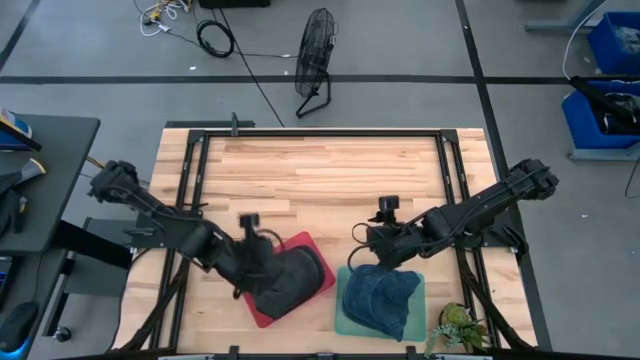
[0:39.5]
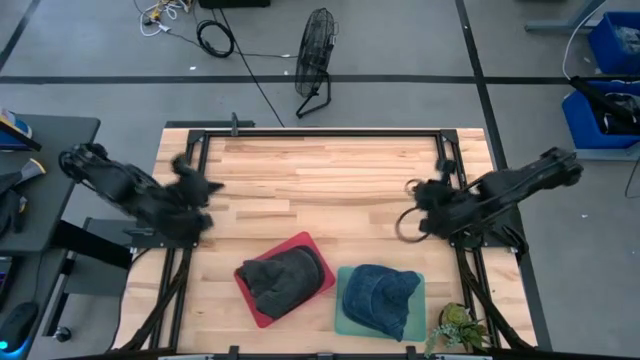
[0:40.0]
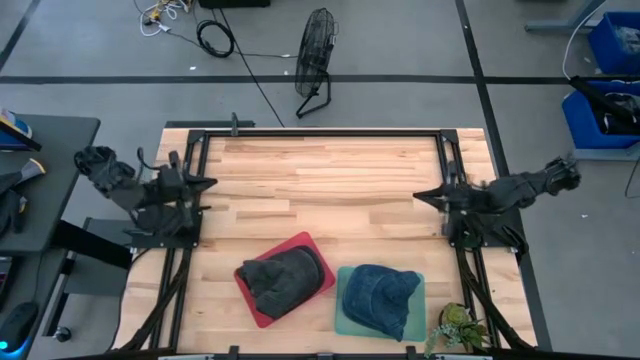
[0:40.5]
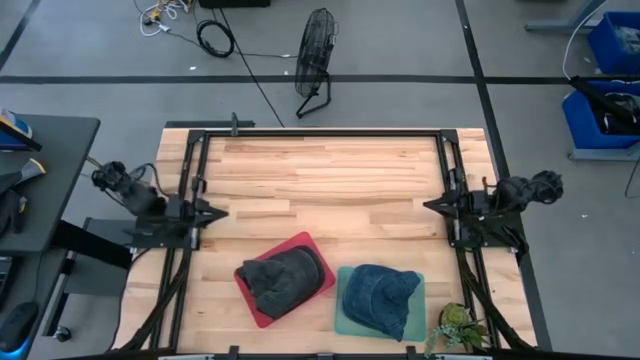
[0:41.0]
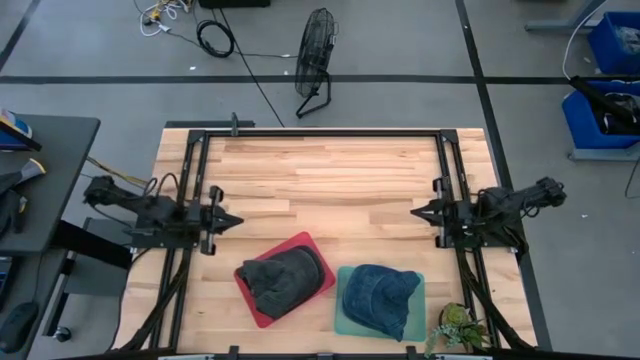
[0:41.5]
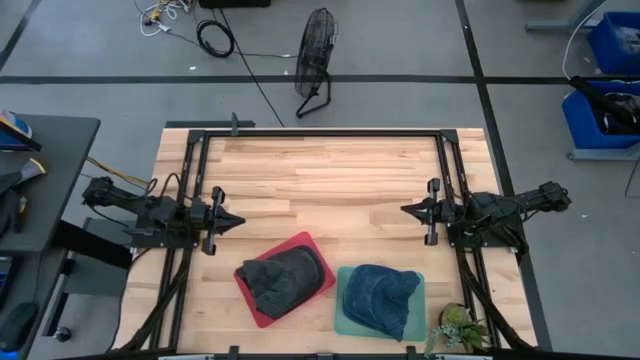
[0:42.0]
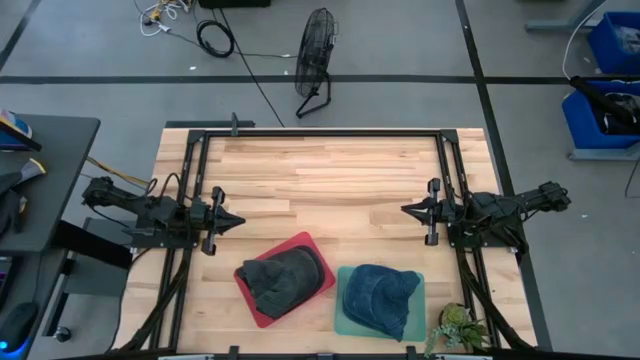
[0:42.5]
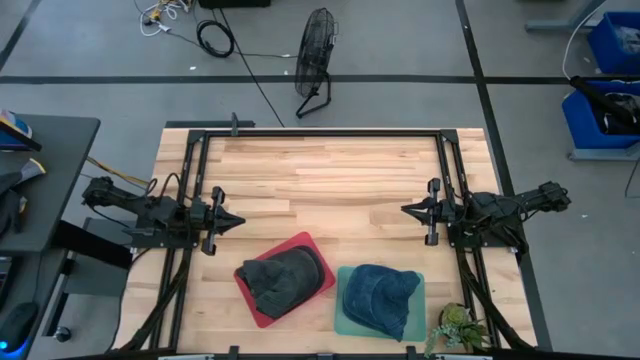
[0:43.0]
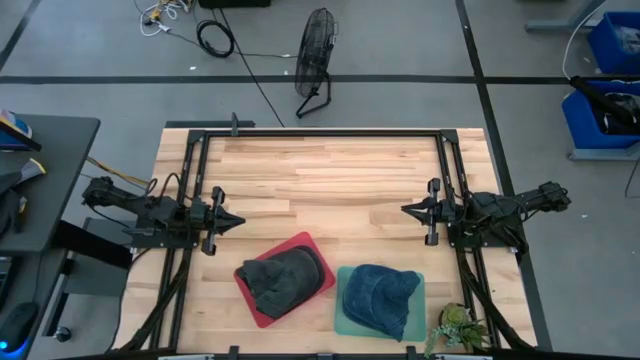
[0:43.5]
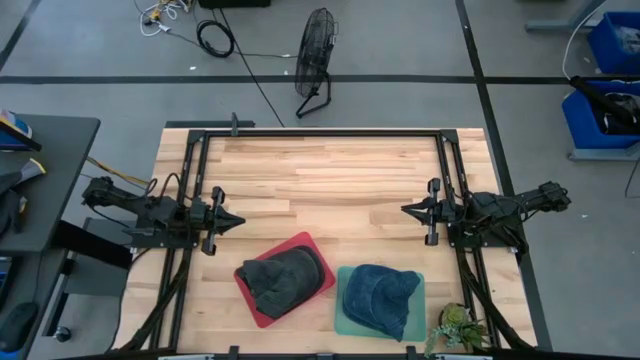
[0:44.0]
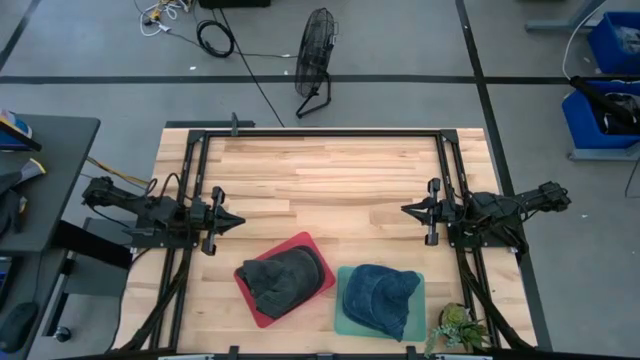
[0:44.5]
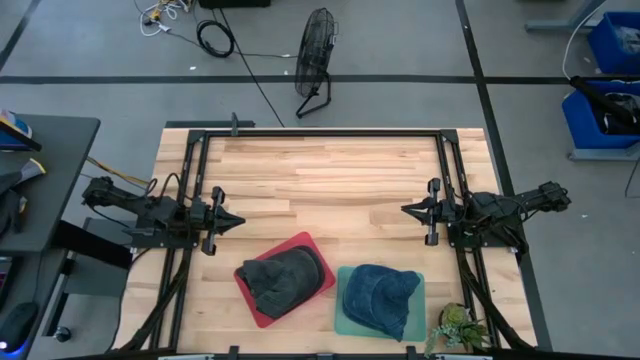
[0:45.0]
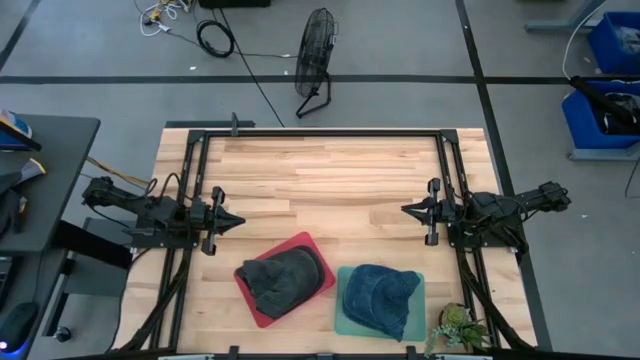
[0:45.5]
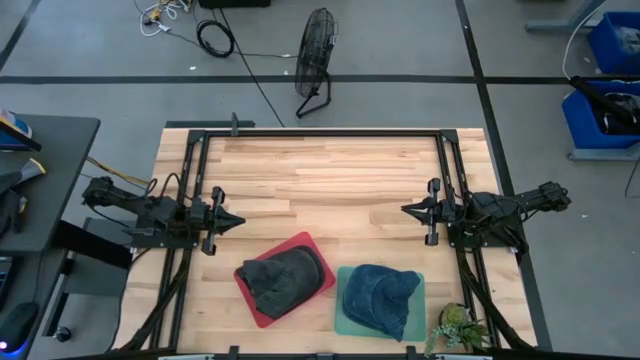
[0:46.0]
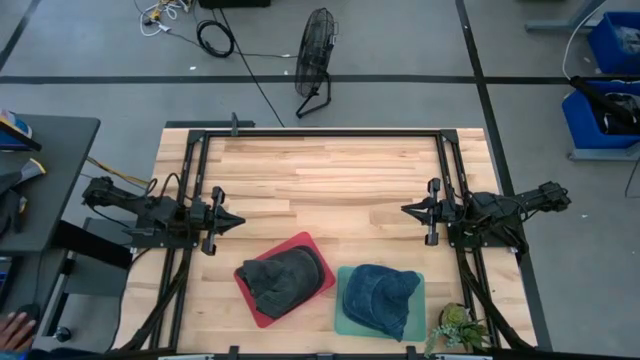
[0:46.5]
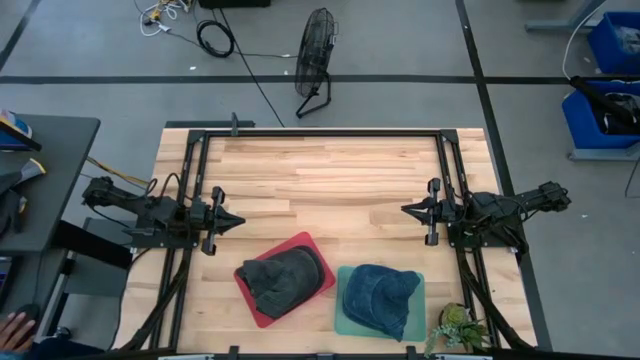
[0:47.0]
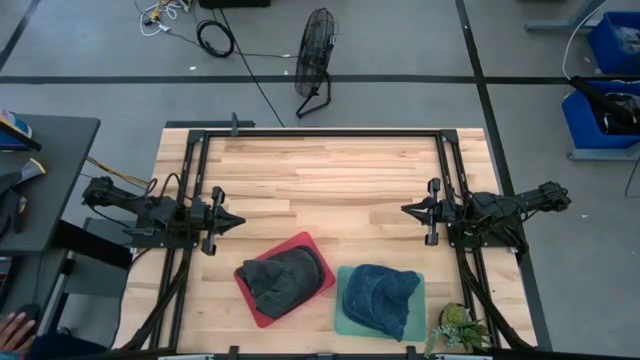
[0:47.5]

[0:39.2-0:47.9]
Task: Pick & Place hat
Return to Home Position

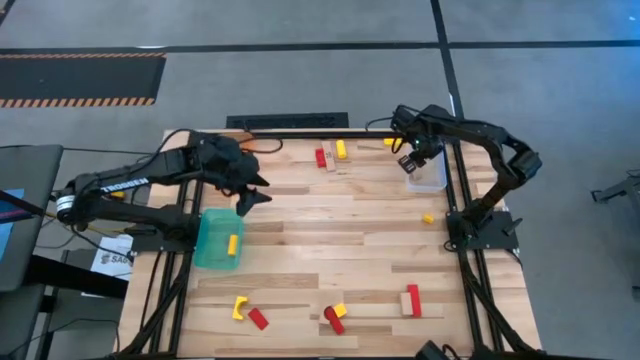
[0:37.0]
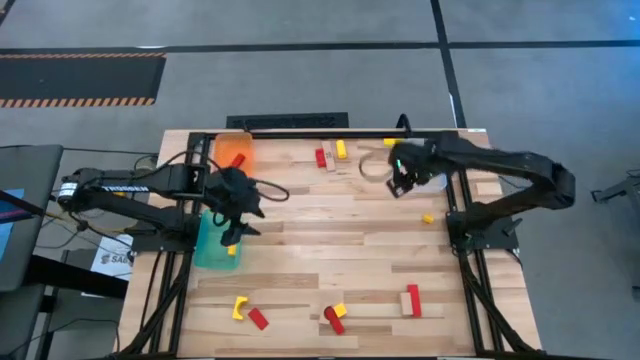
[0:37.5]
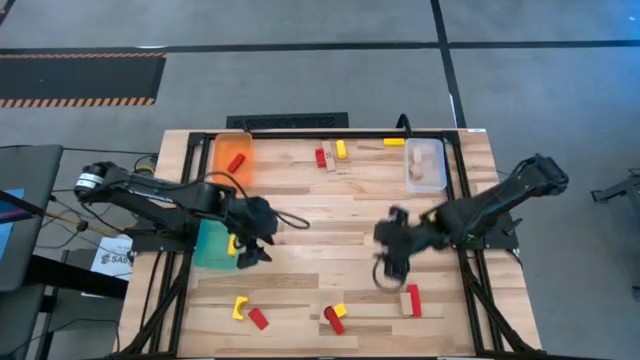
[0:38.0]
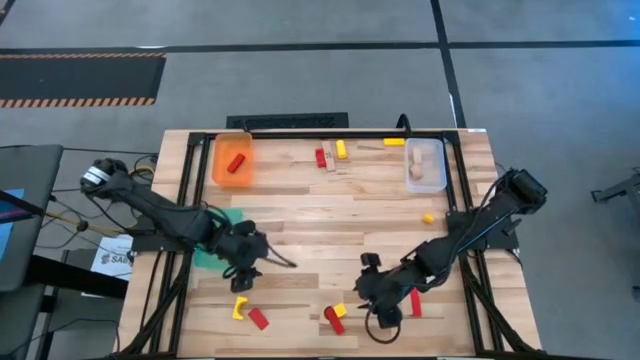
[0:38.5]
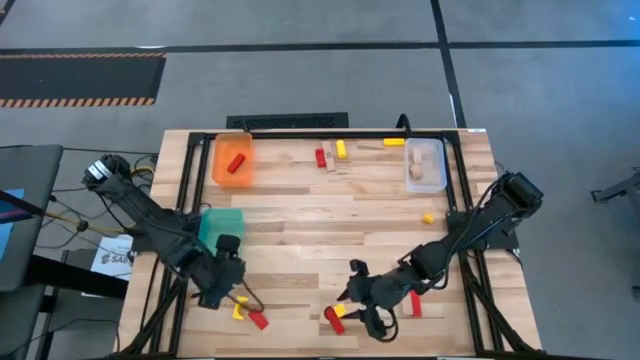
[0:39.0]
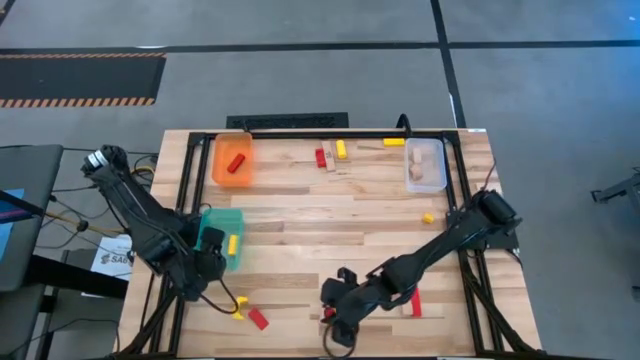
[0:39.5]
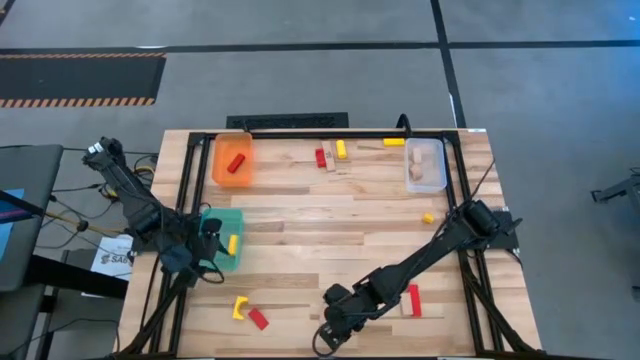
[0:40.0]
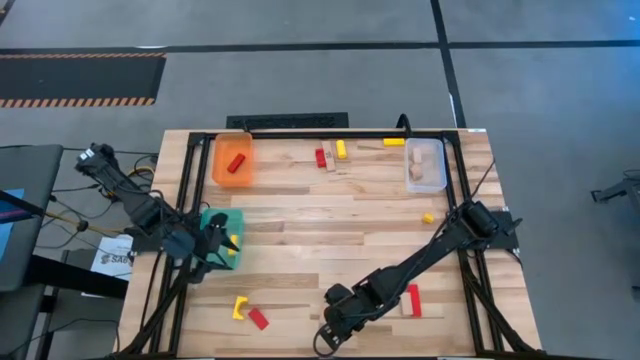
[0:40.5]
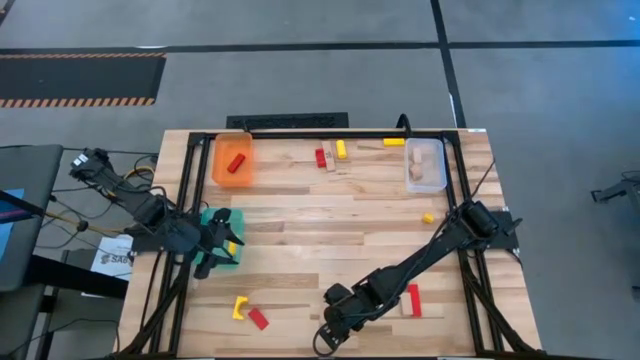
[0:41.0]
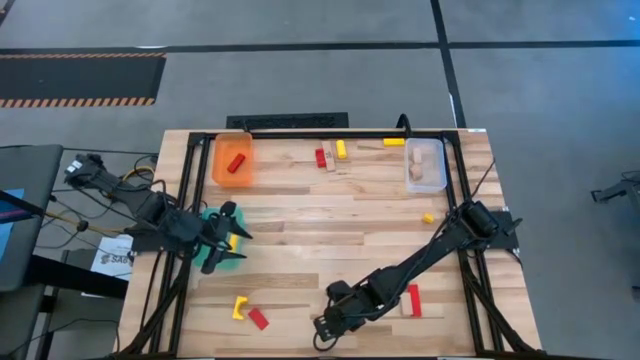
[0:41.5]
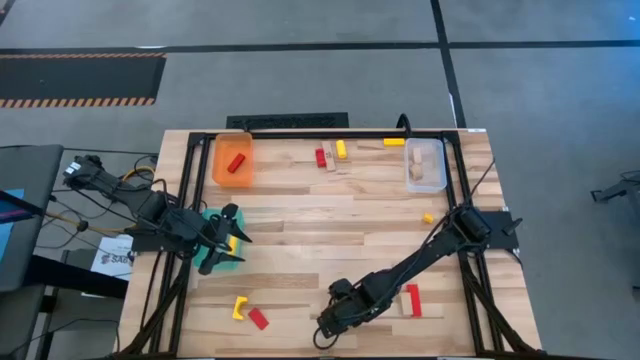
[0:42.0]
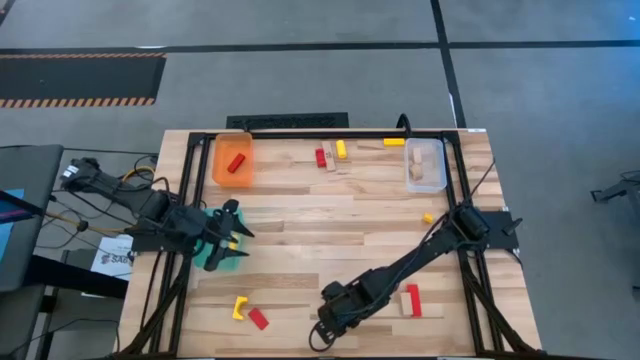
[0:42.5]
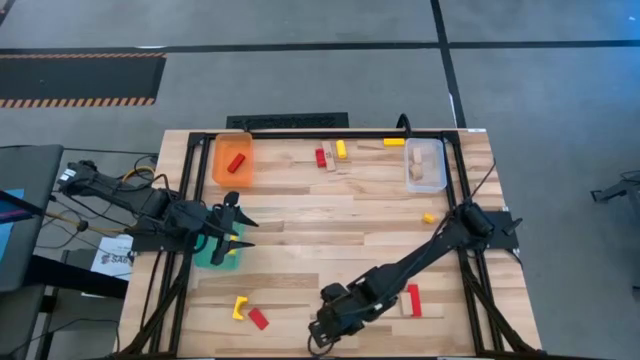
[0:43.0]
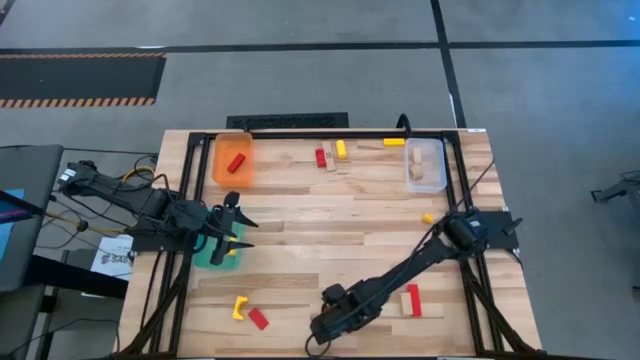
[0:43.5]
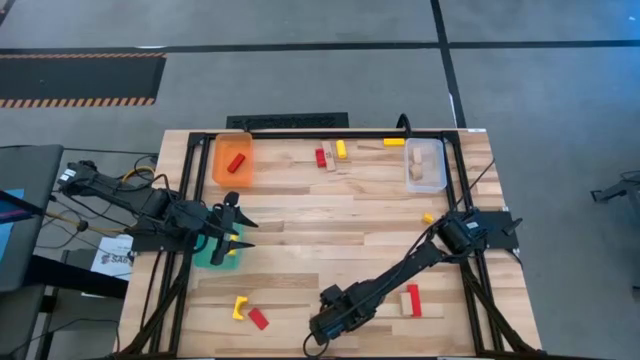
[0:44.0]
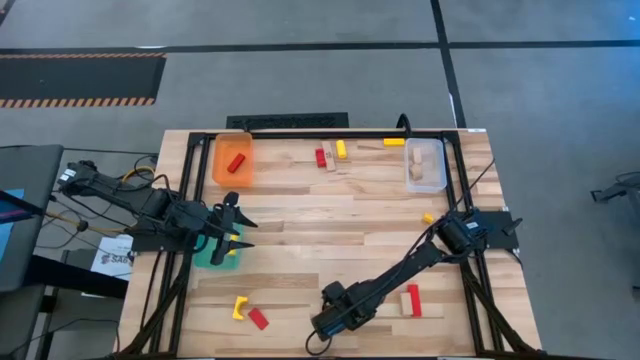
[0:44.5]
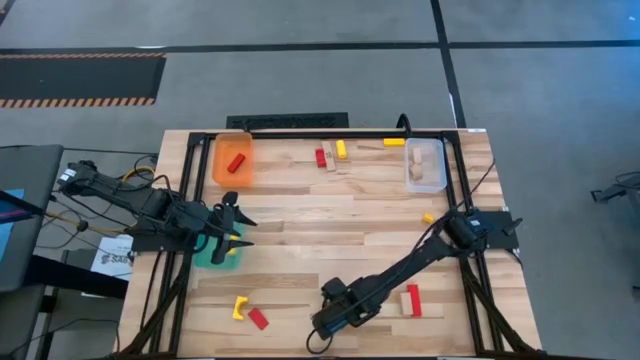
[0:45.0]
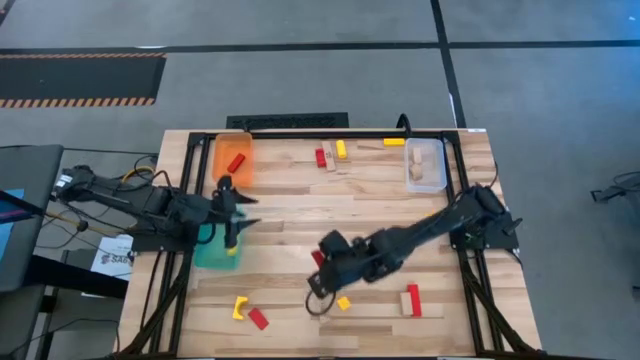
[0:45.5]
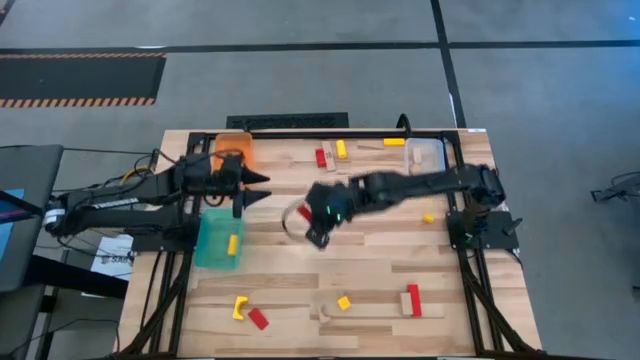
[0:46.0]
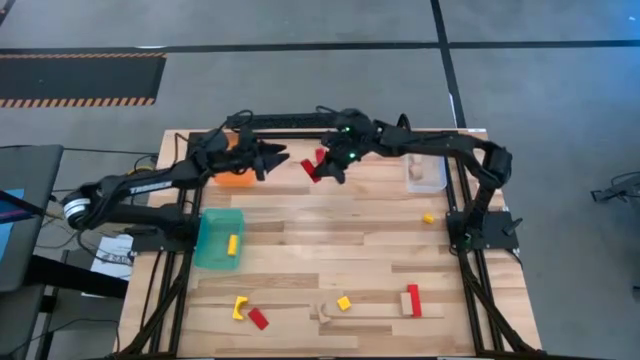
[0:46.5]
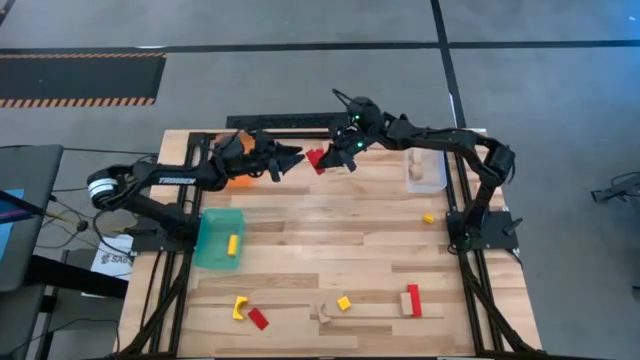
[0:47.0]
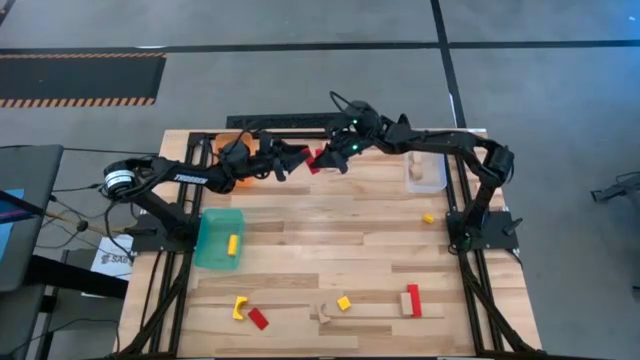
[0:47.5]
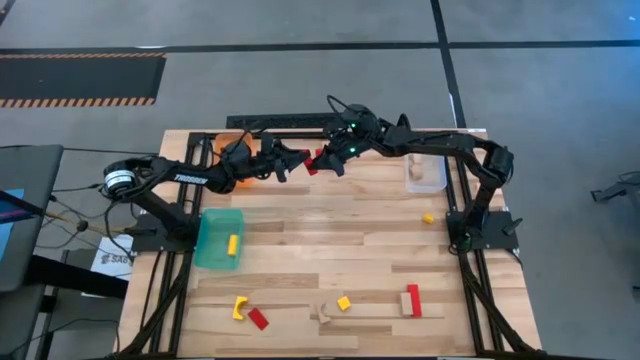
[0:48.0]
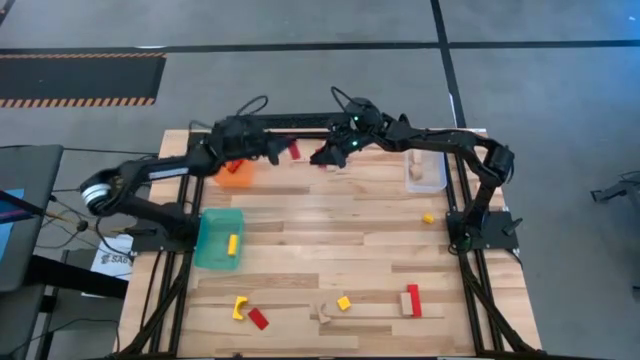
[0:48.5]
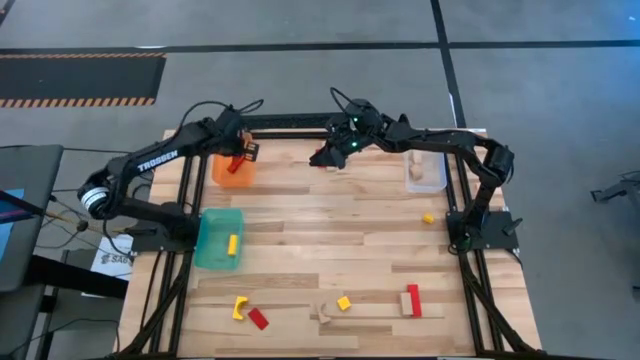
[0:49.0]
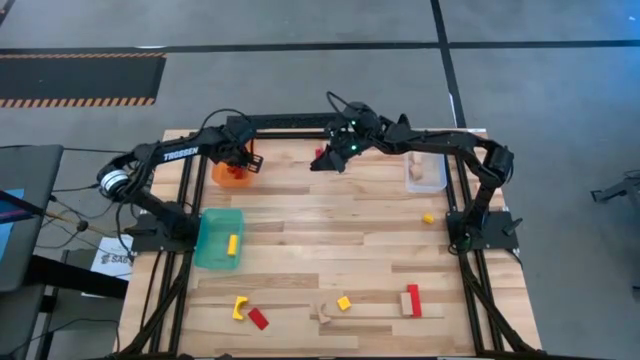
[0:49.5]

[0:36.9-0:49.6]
Task: Sort & place blocks by color
Put the red wooden block into the orange bin
